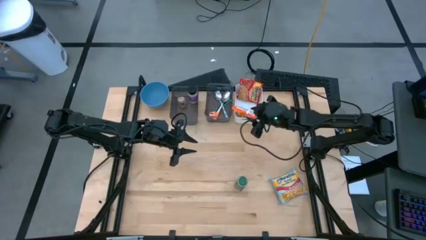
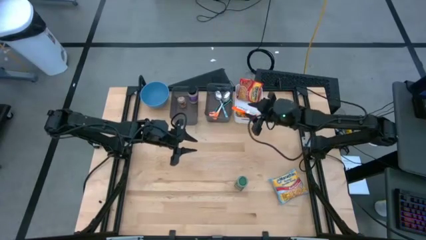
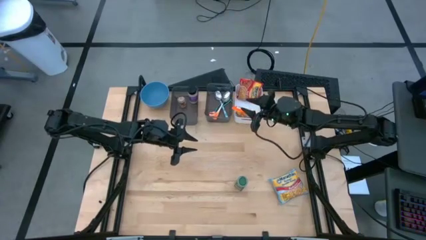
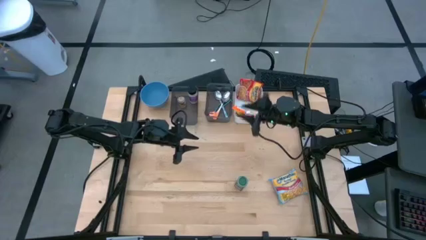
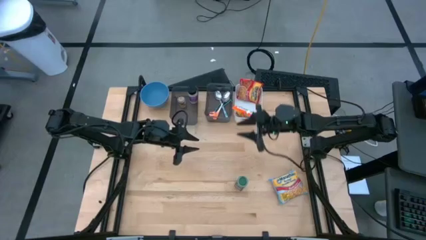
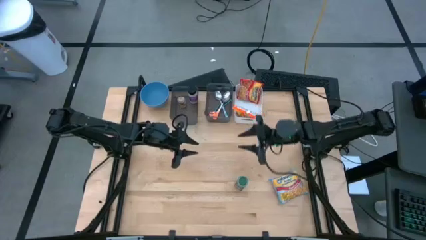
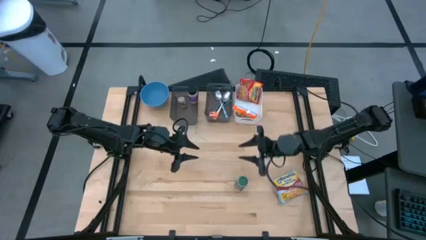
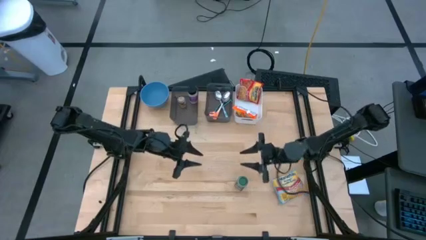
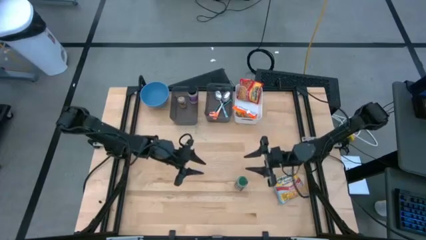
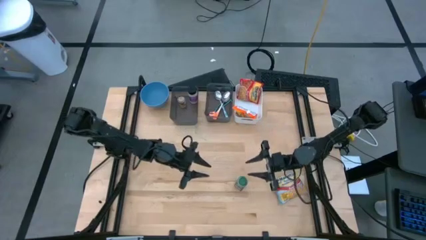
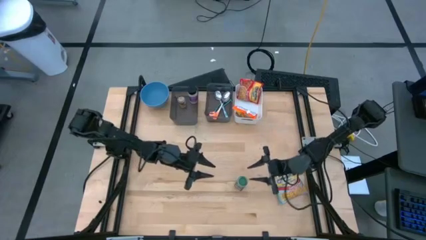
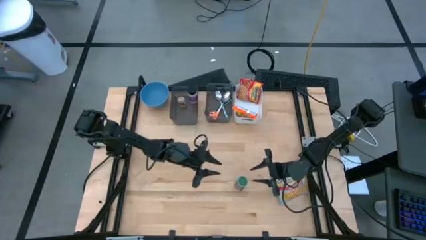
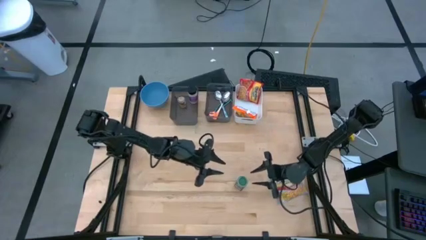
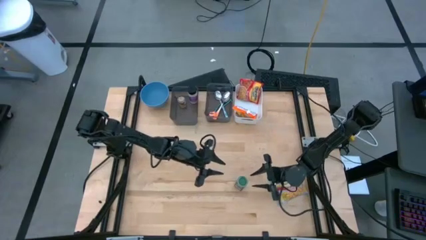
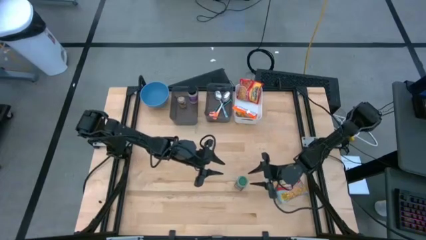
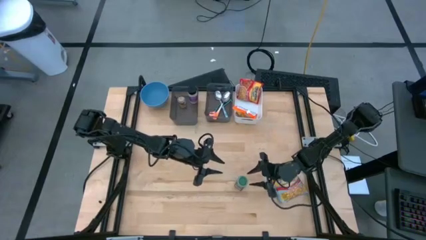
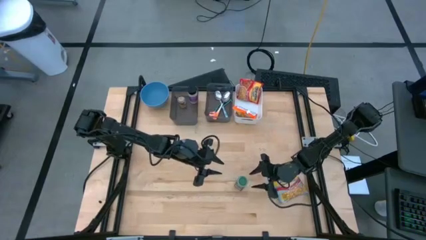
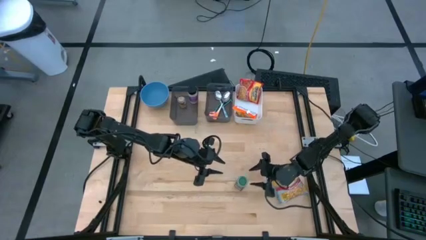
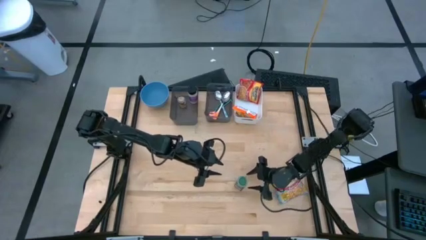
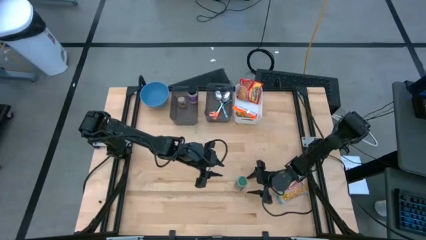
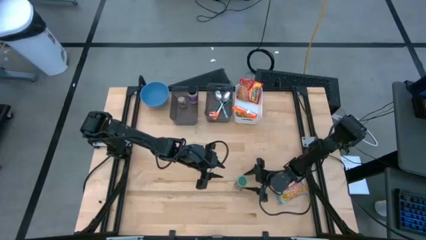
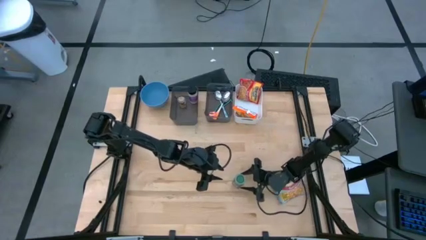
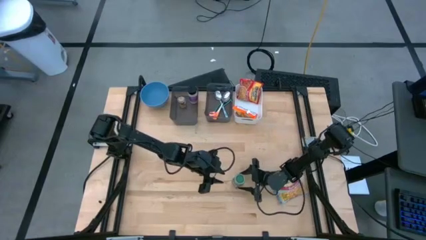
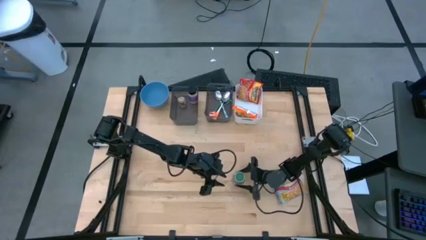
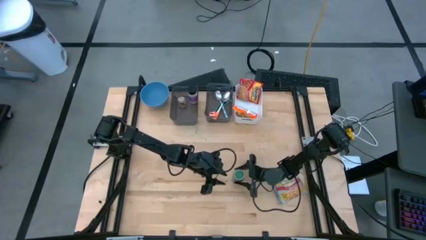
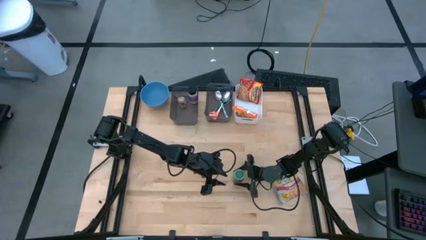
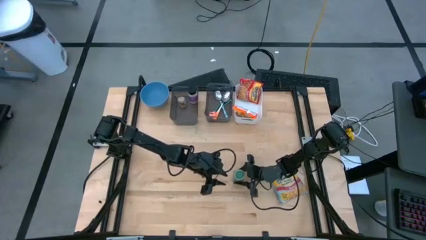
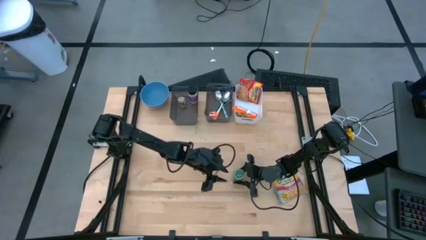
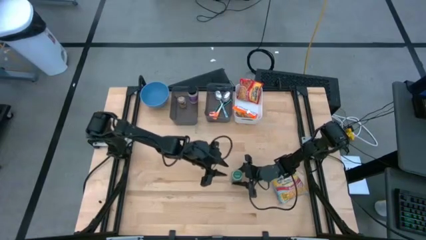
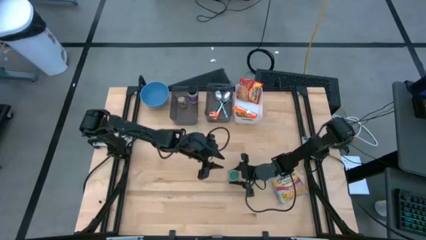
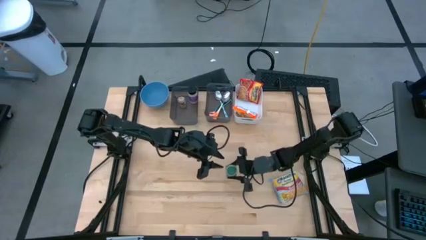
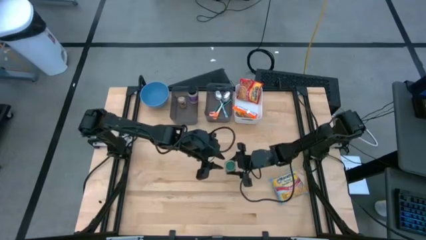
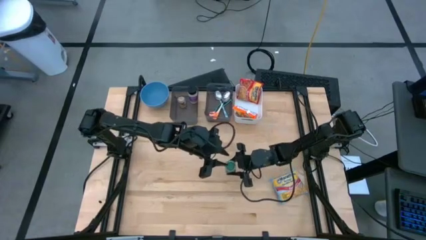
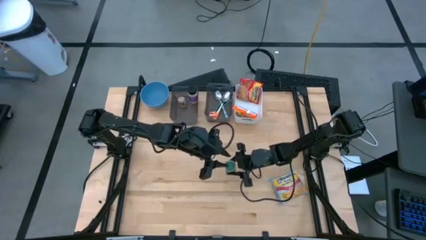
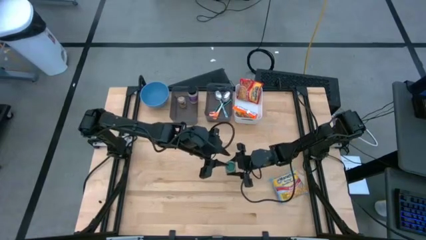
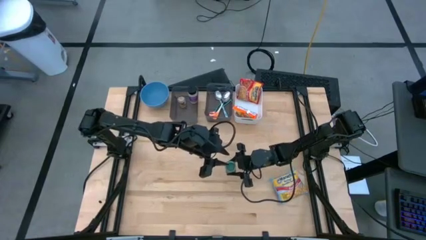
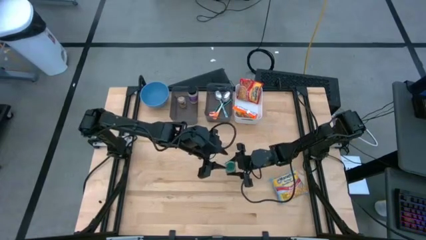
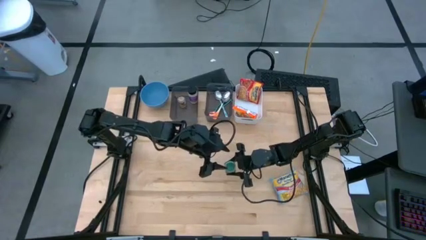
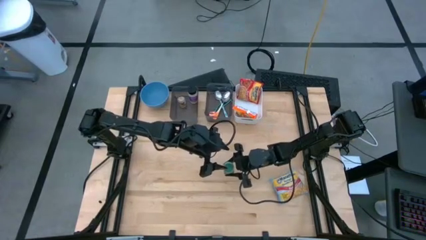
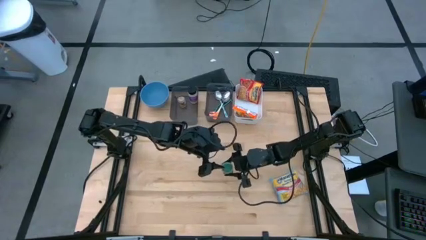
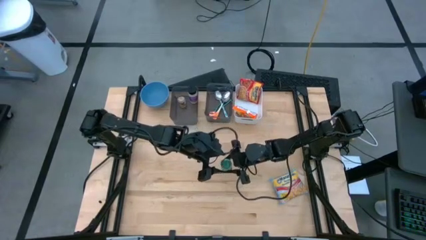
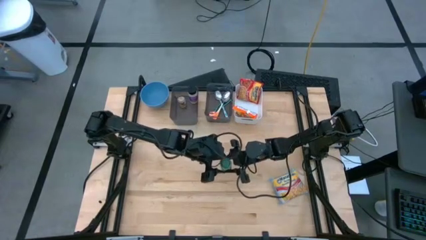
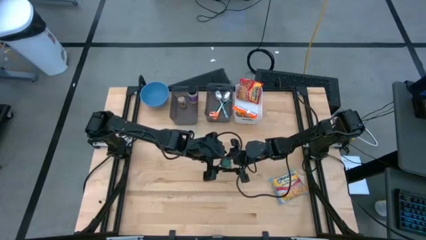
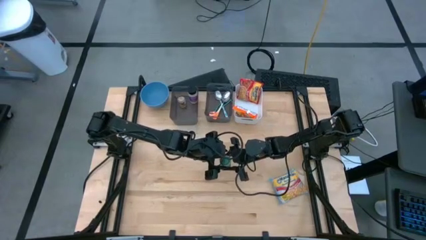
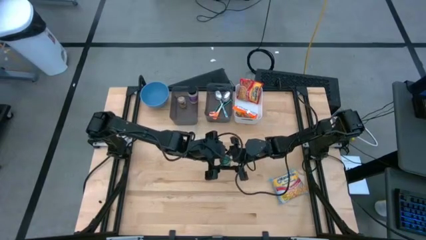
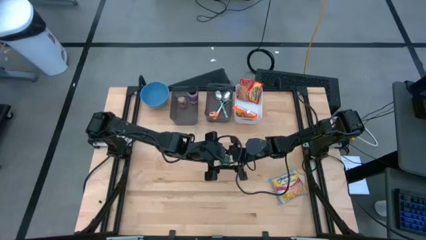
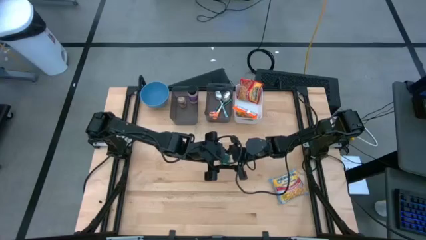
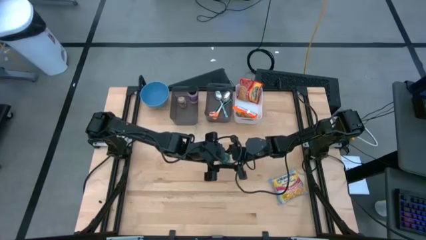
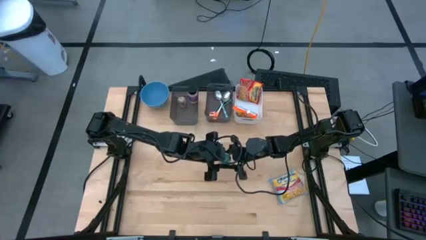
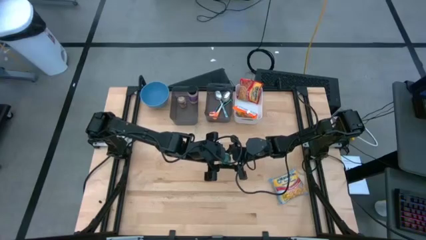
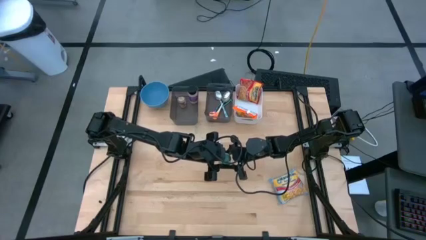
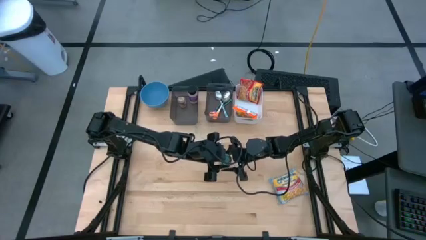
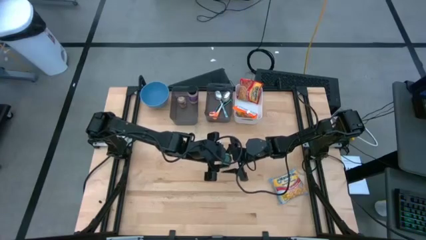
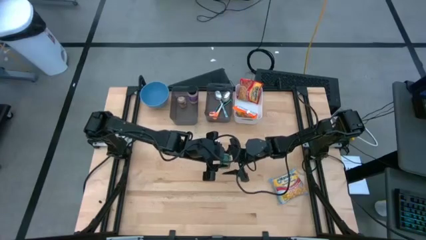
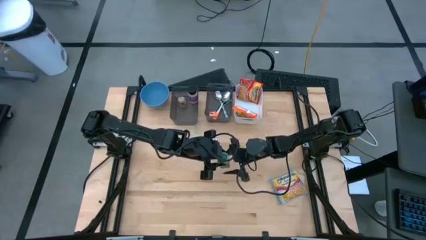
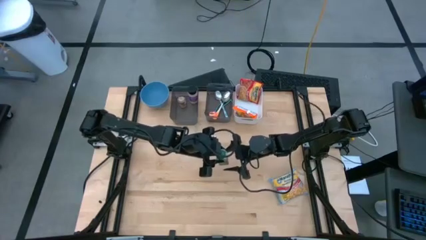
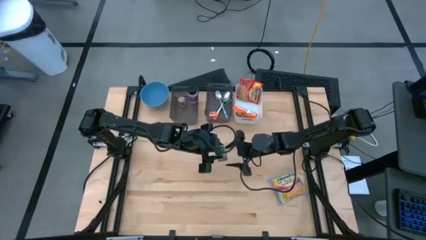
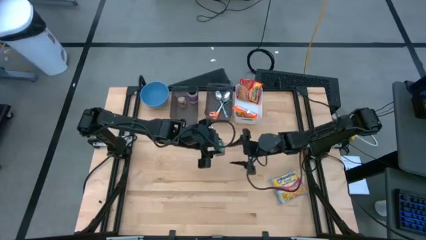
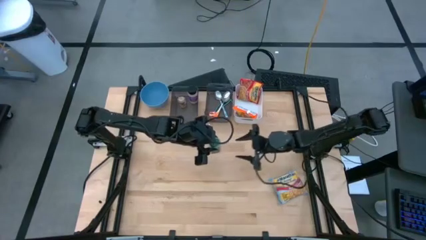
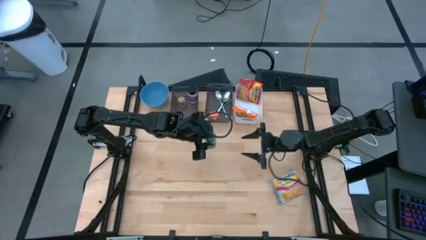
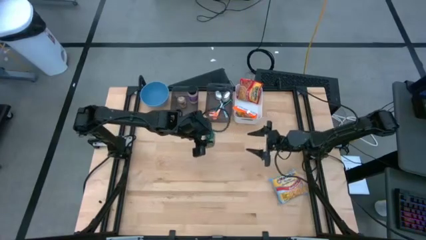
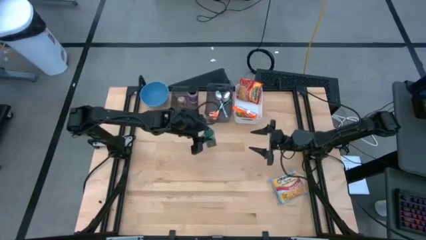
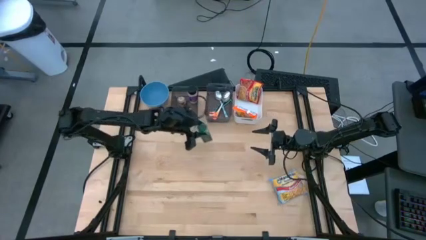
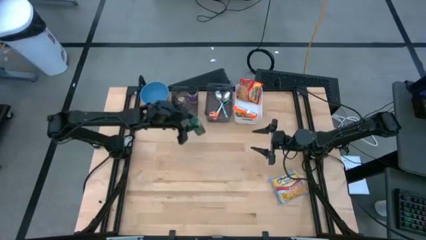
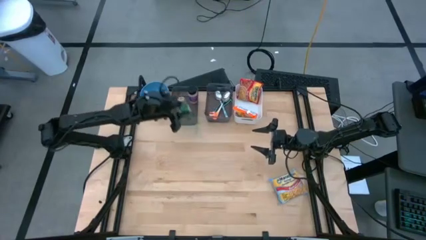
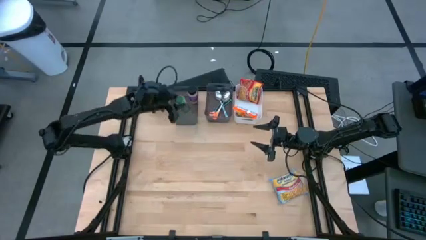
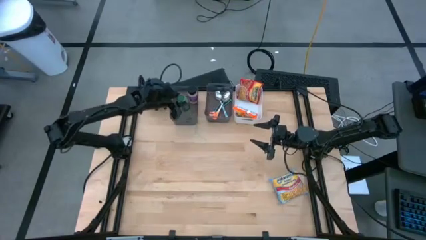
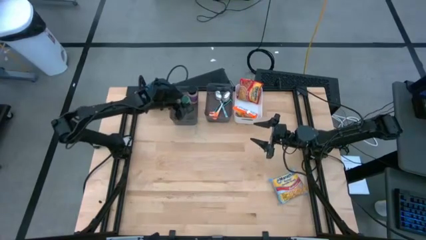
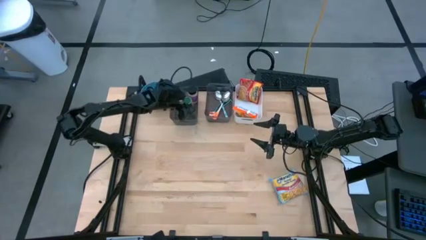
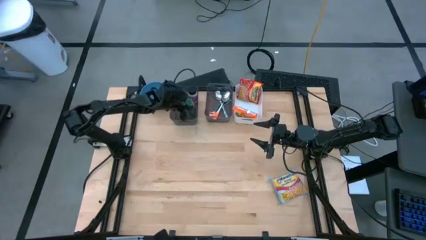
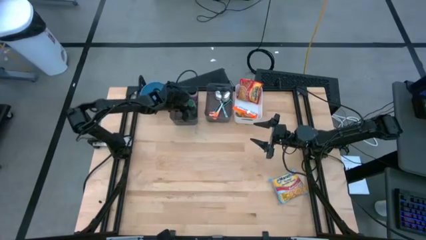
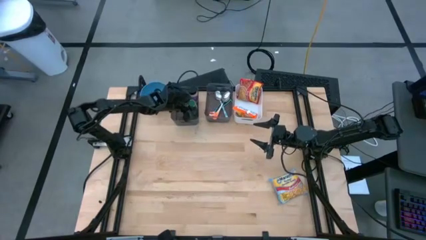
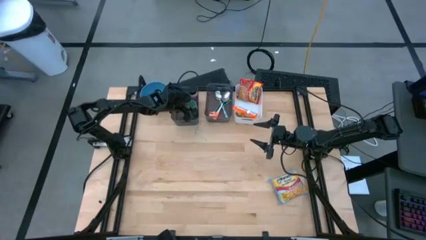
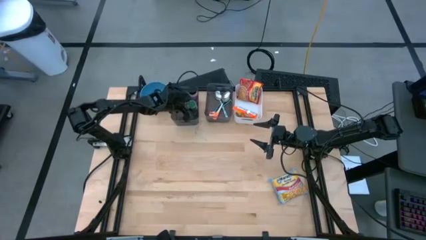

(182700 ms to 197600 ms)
Task: Pick & Place Food Item
Put the green spice bottle into the left black bin

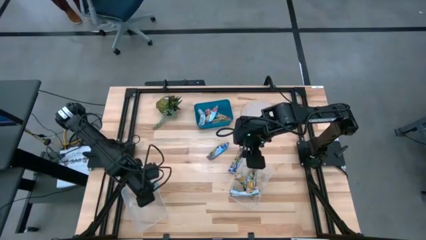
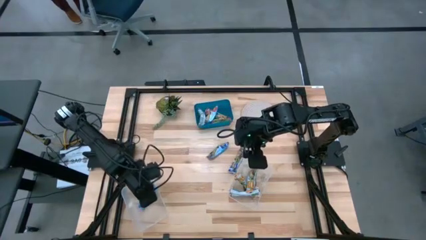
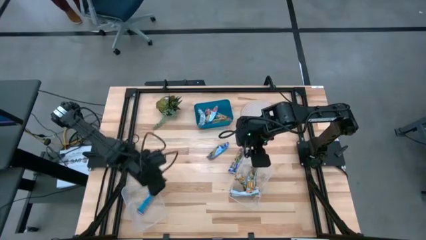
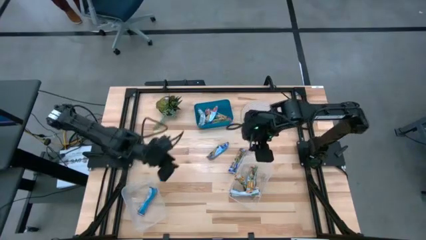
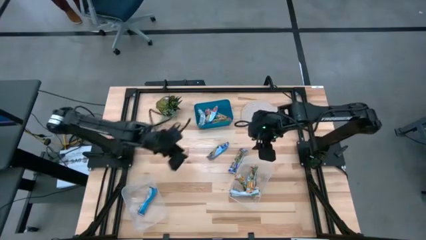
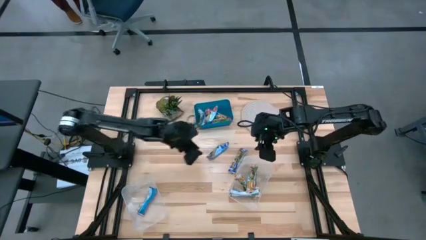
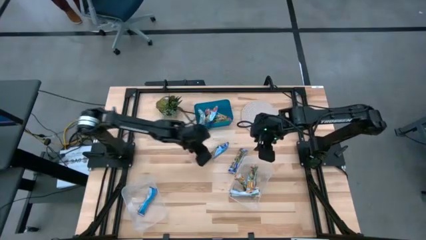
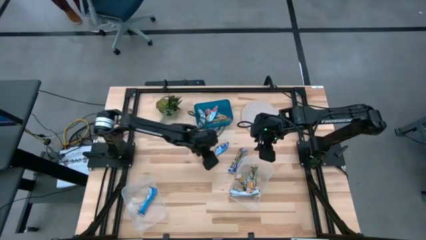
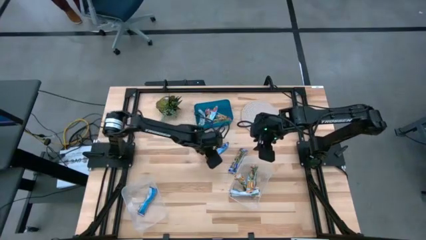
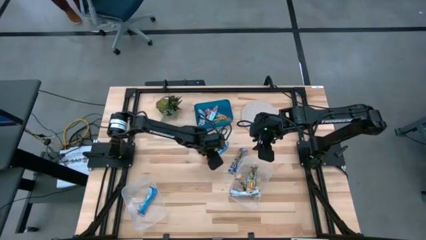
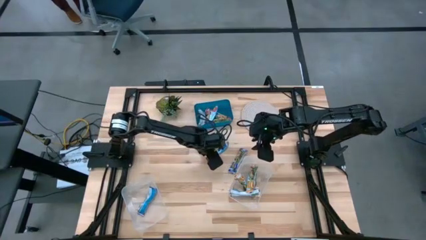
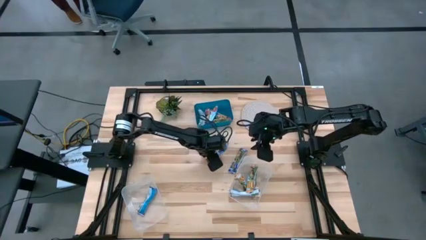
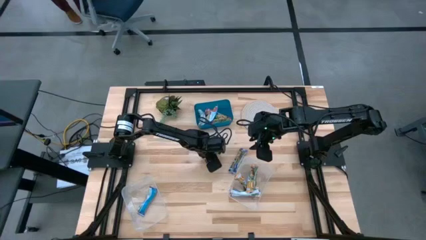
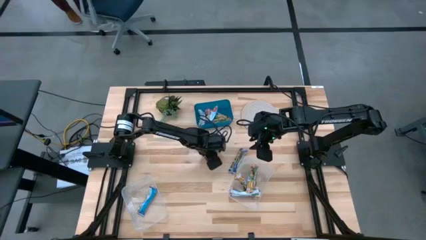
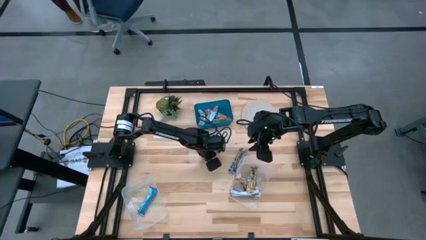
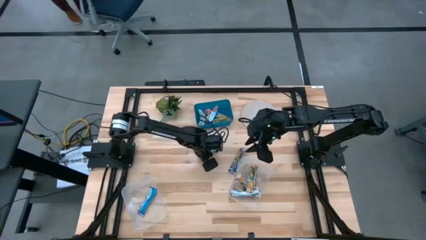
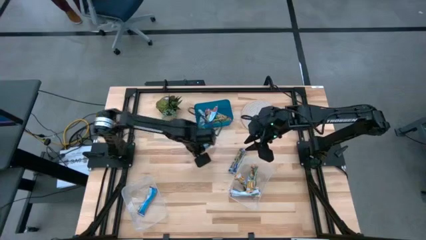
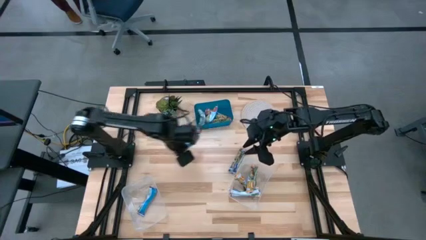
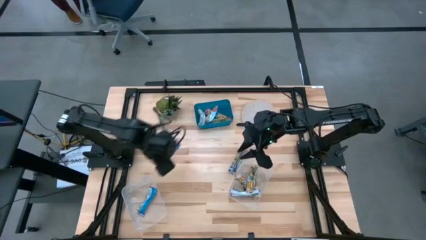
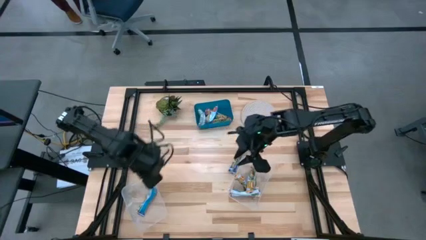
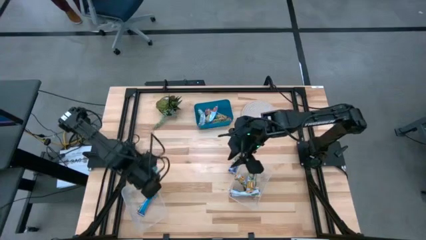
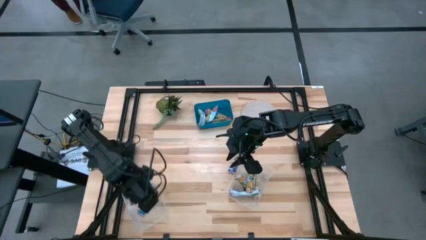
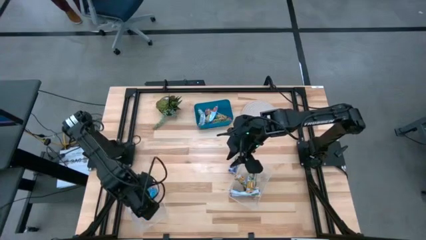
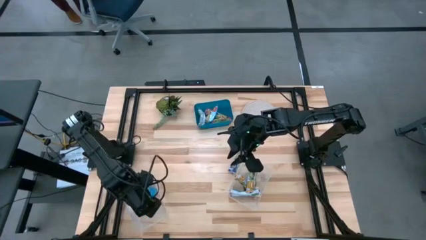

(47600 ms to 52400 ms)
Task: Pick and place Granola Bars by type
Put the blue granola bar into the left transparent bin
